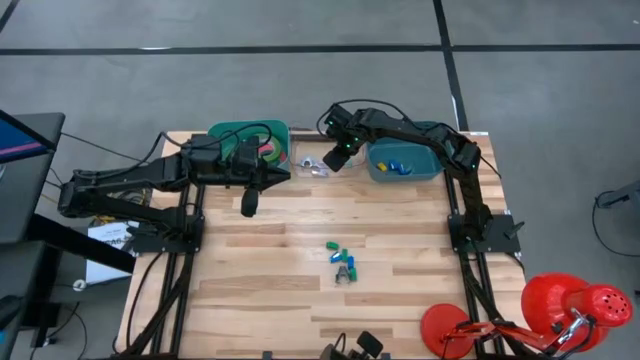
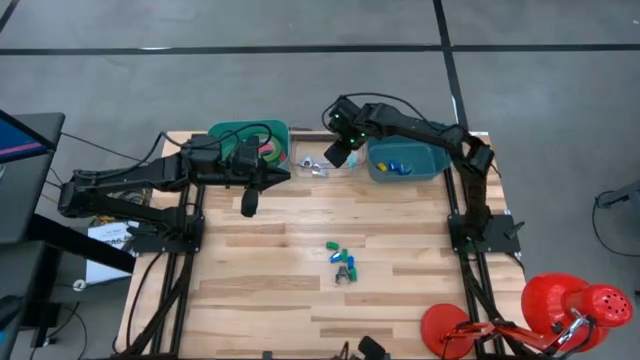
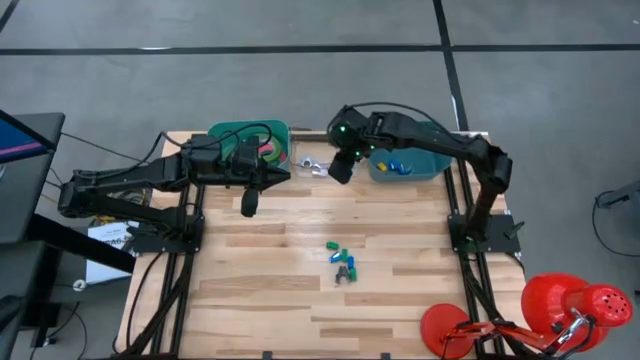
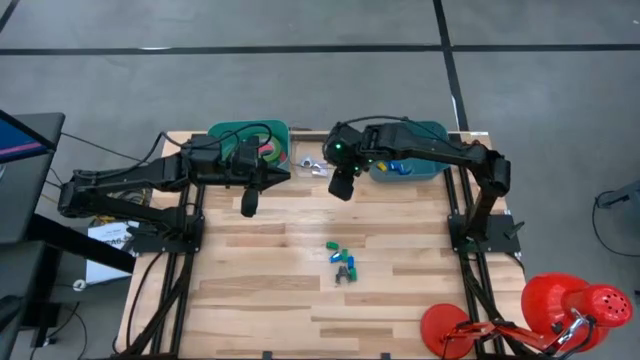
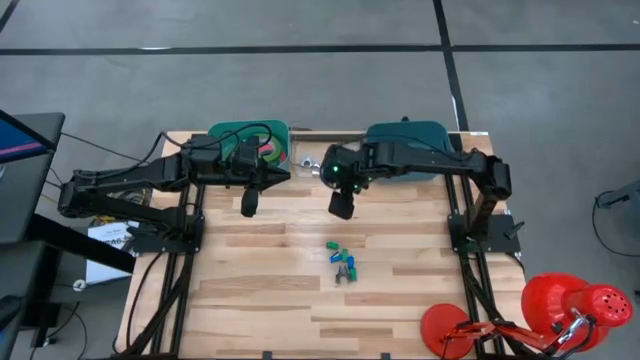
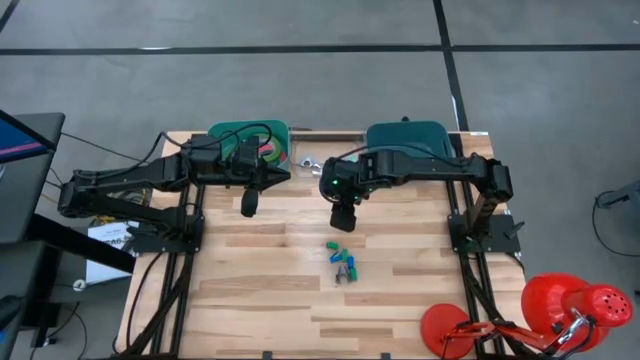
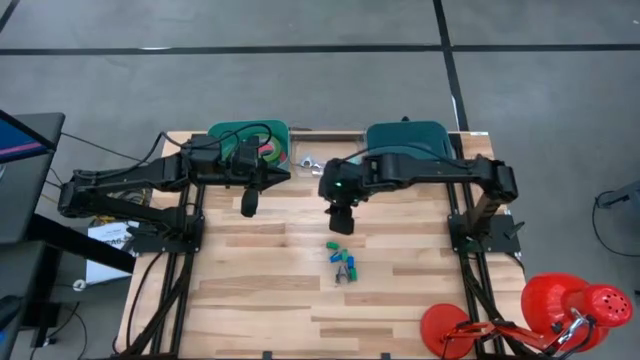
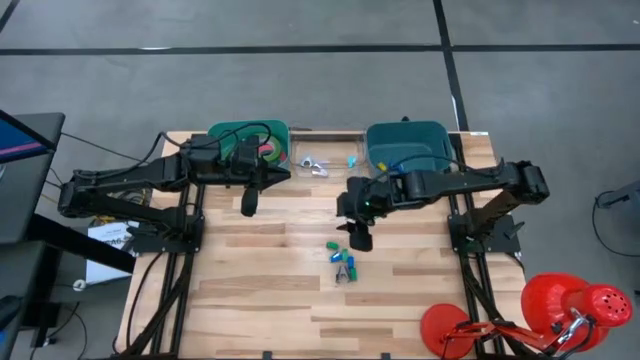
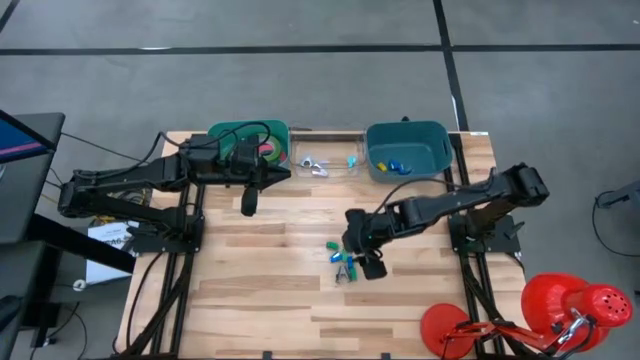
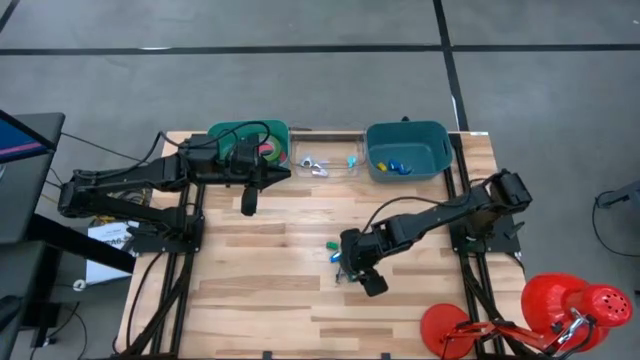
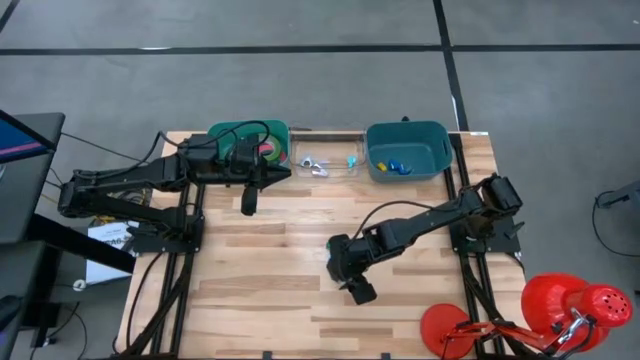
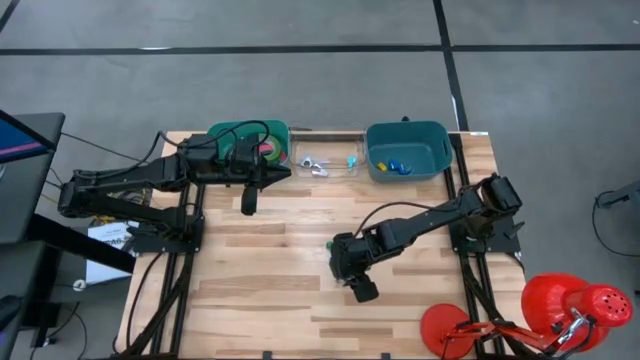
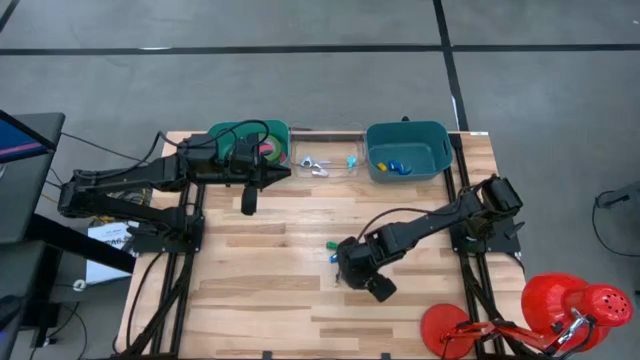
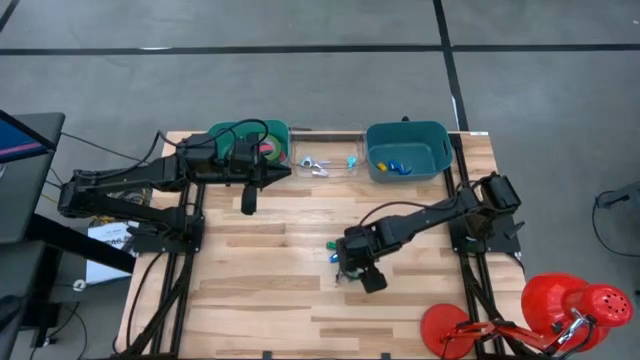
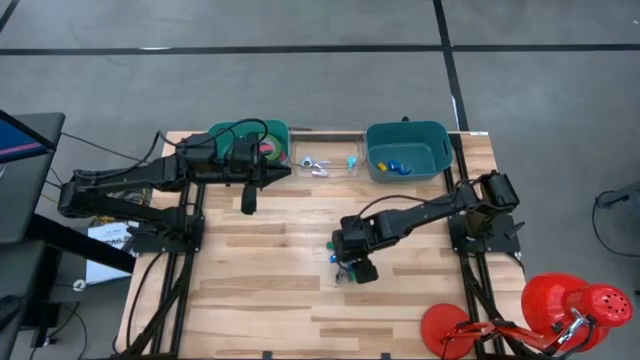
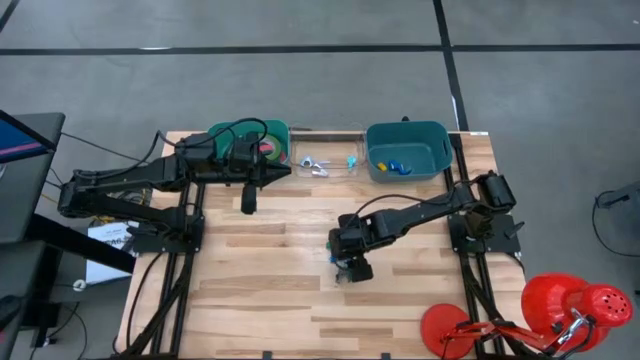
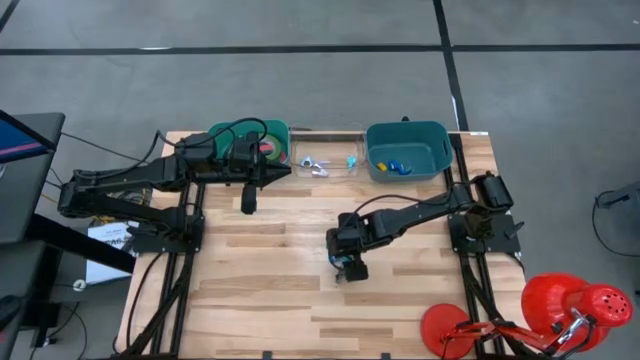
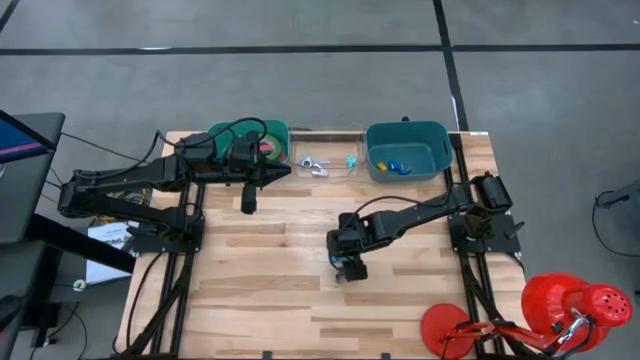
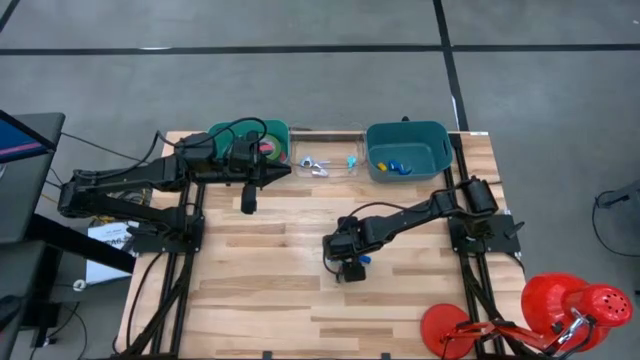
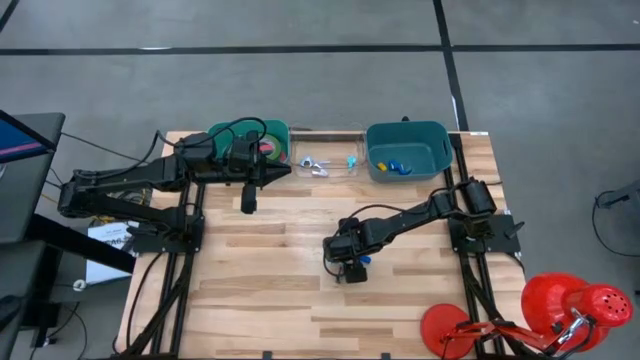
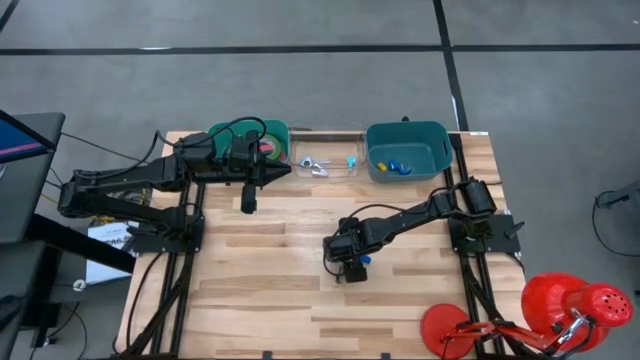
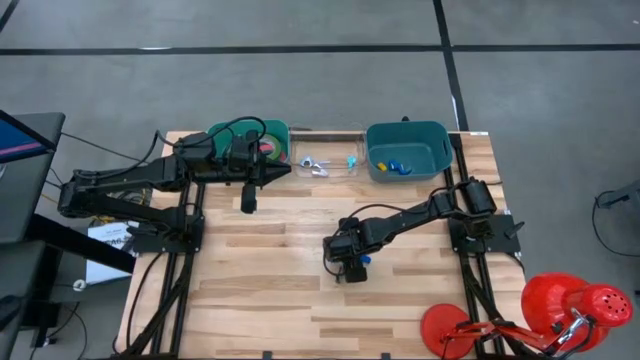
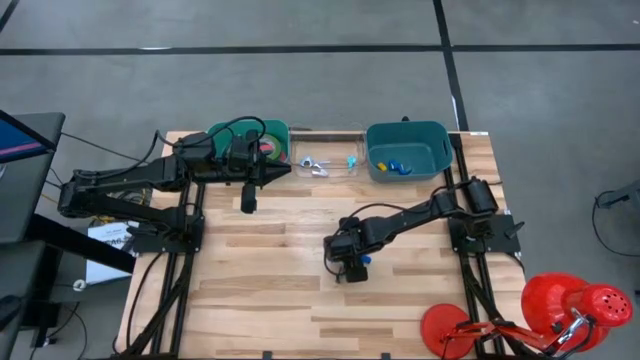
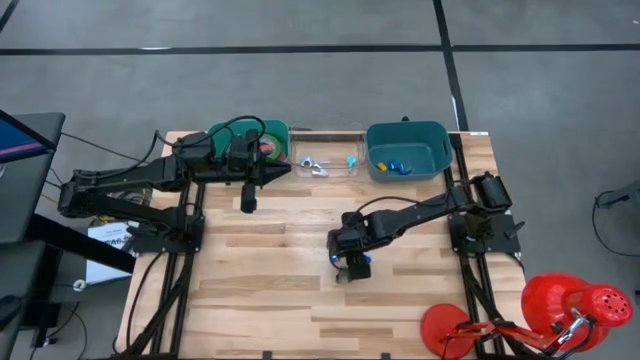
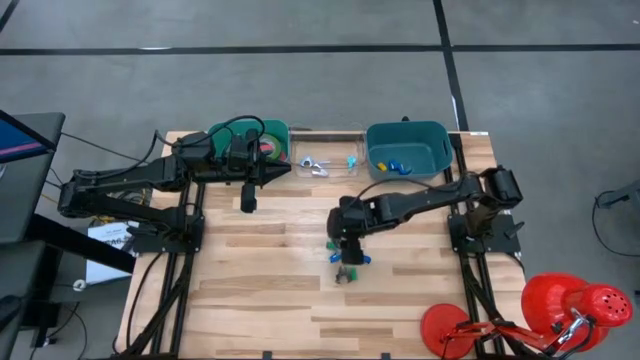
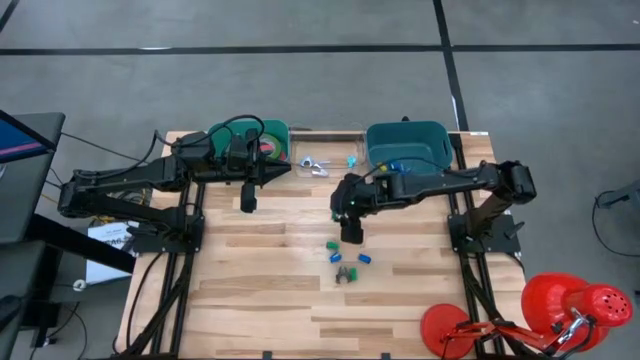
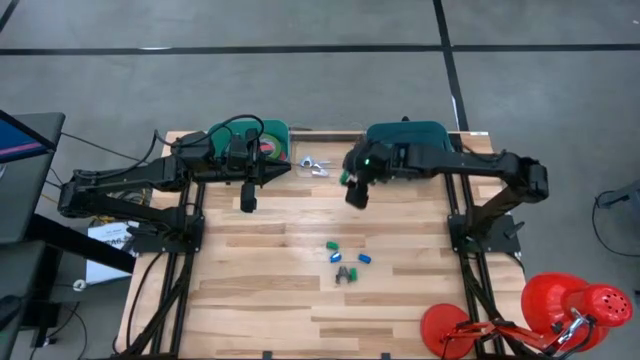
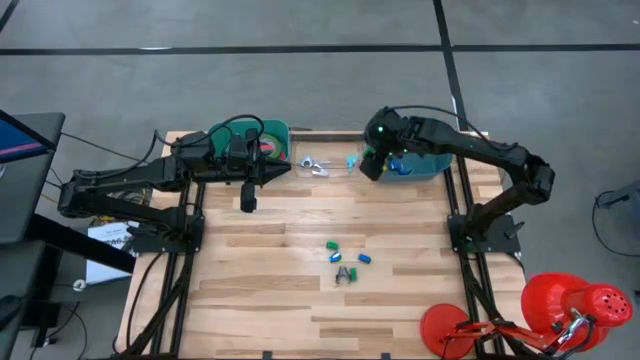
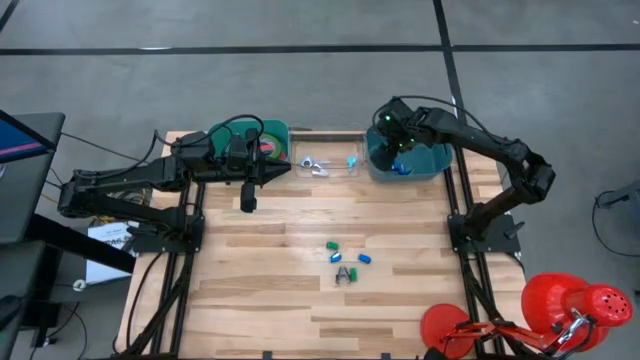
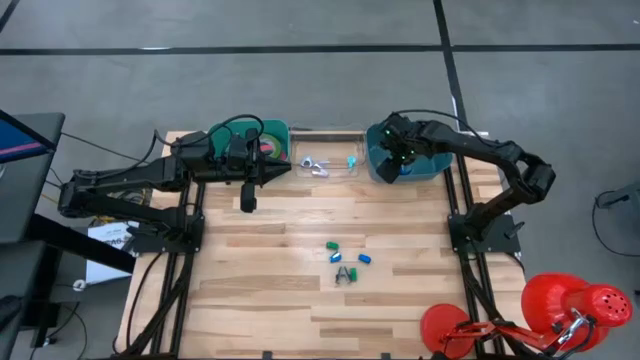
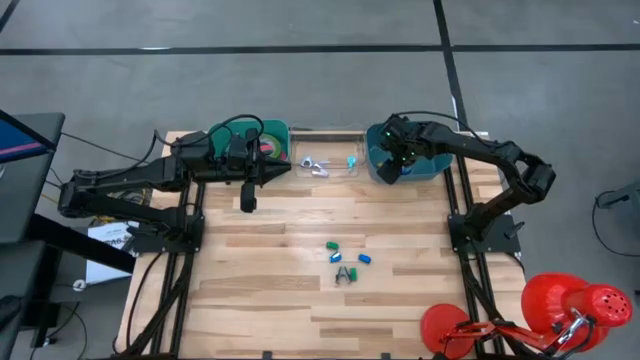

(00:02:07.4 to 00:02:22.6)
Task: Pick and place Stapler, Stapler remover, tape
Put the green stapler into the dark blue bin

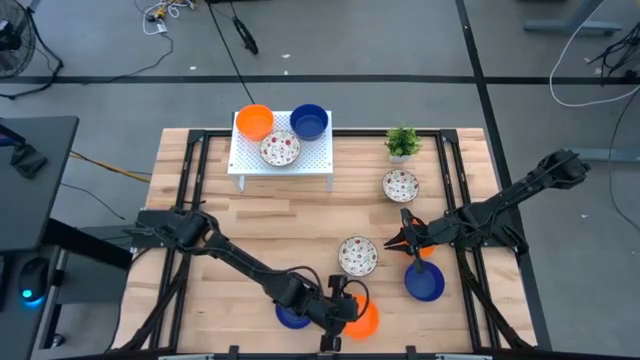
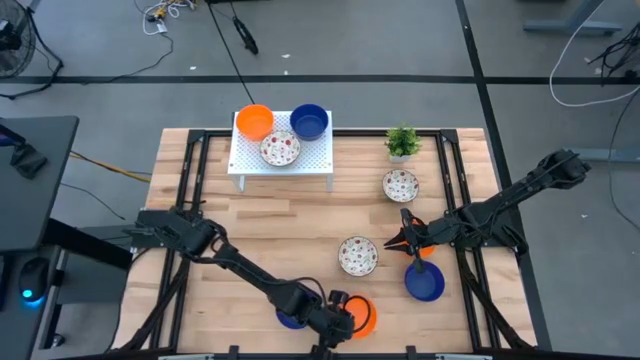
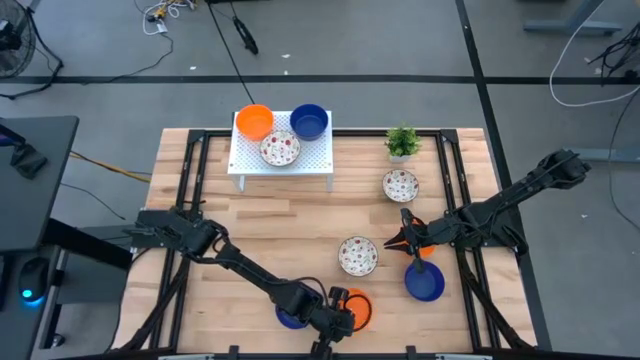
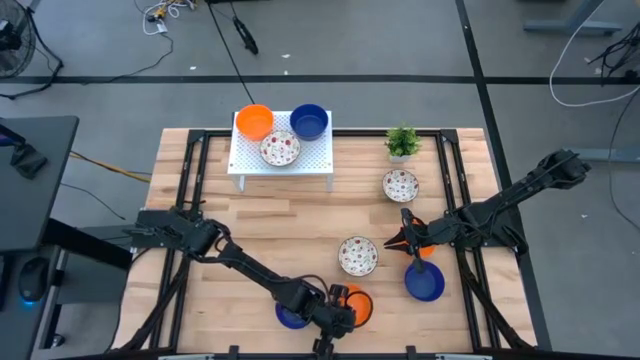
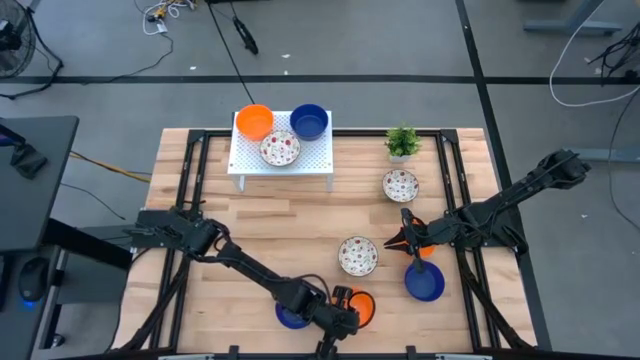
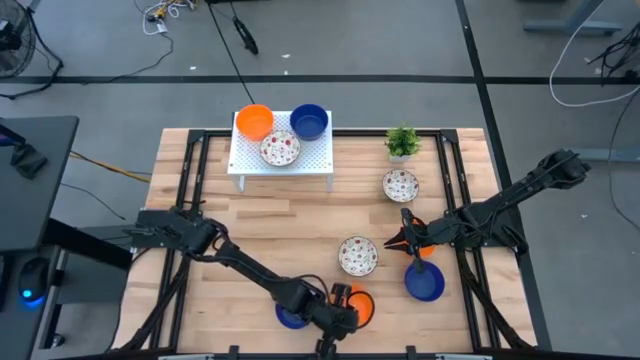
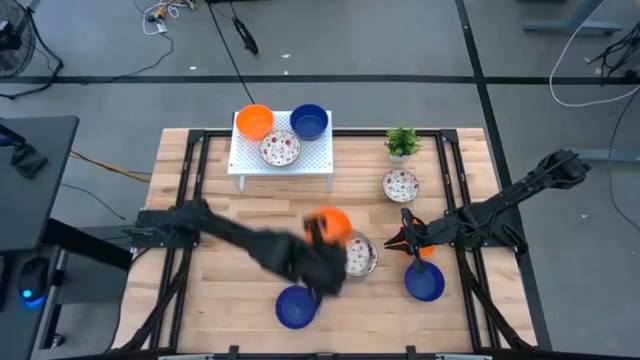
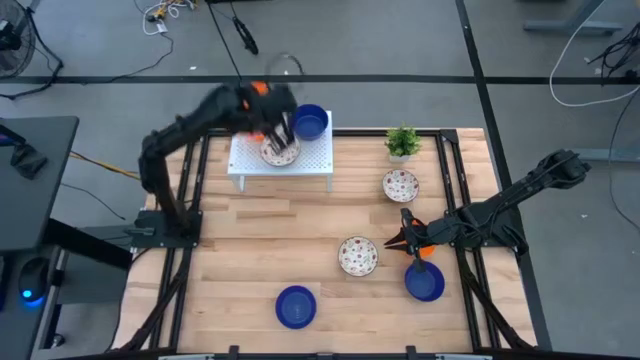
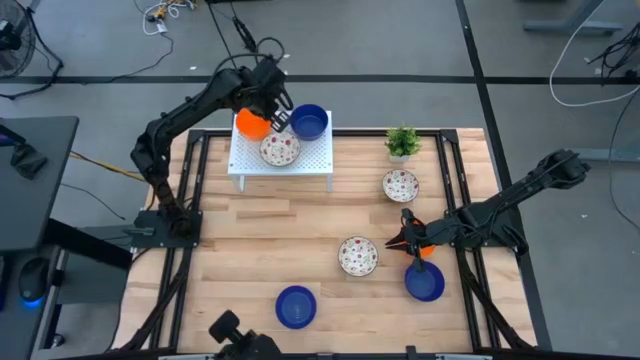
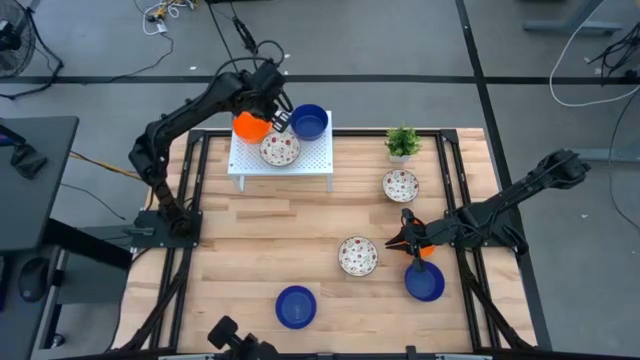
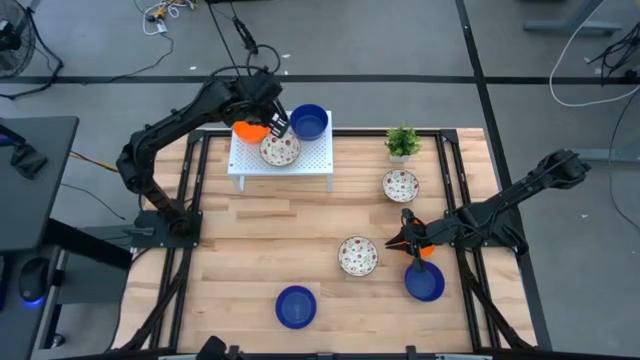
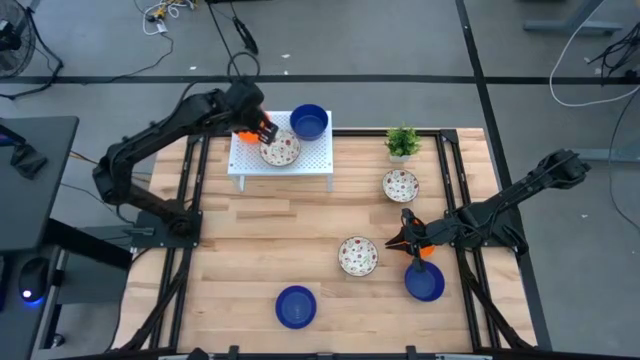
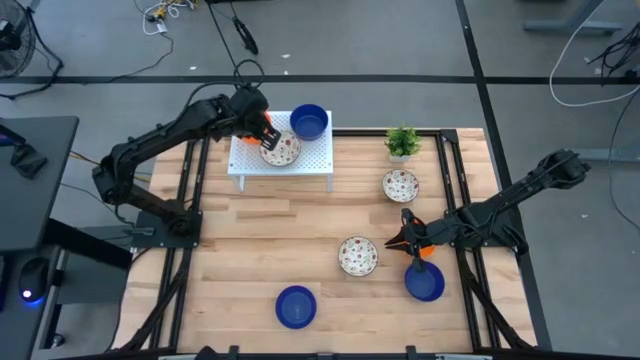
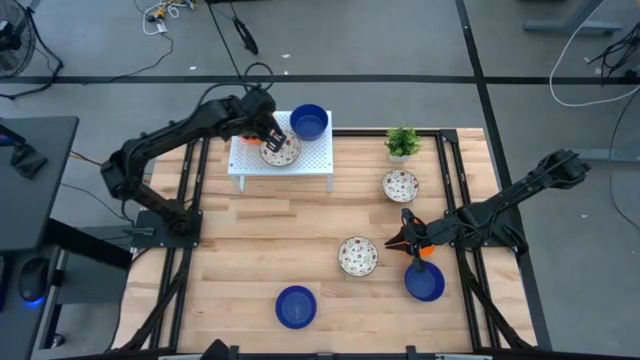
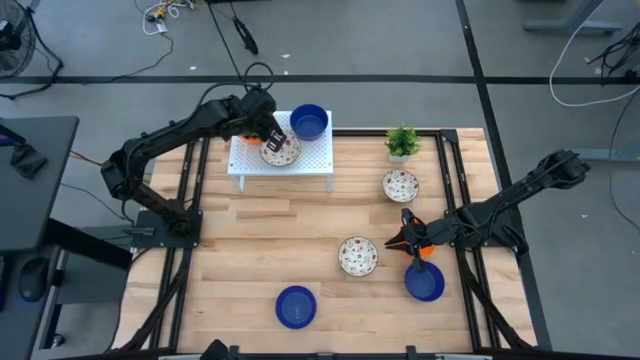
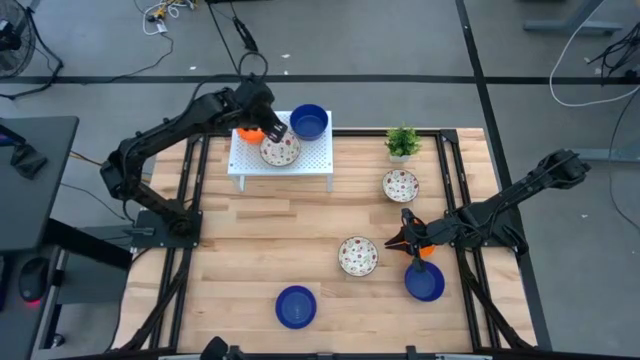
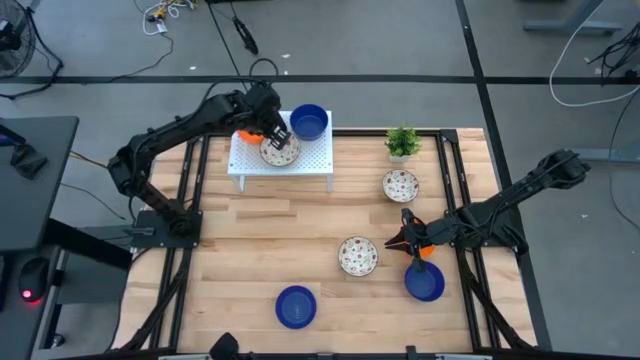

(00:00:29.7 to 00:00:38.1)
Task: Pick & Place Mini bowls
Stack the orange bowl on top of the orange bowl on the shelf
